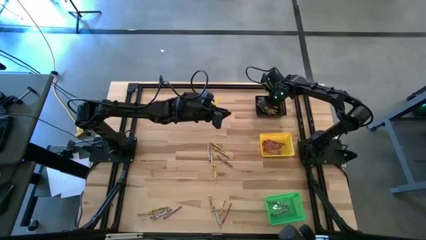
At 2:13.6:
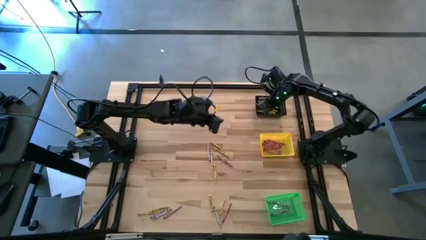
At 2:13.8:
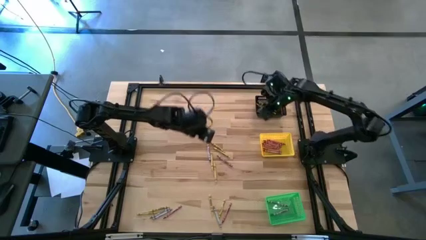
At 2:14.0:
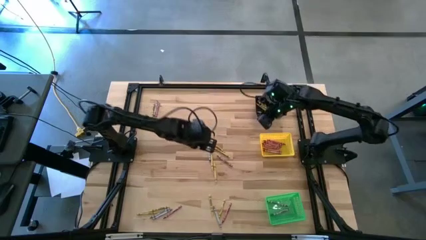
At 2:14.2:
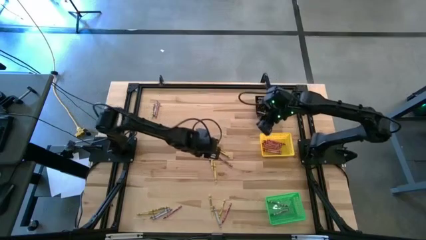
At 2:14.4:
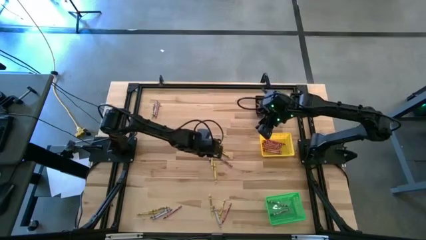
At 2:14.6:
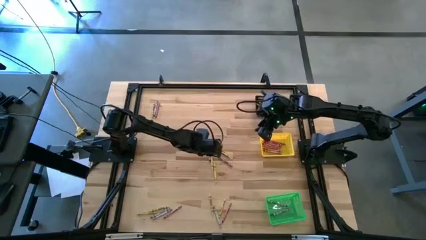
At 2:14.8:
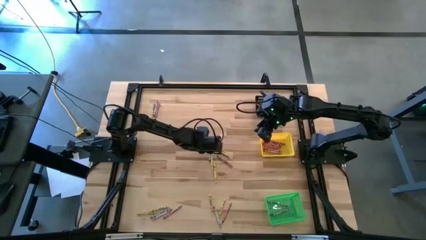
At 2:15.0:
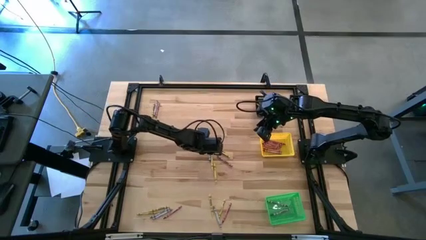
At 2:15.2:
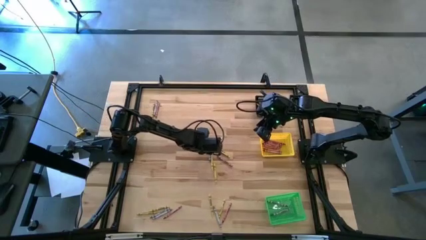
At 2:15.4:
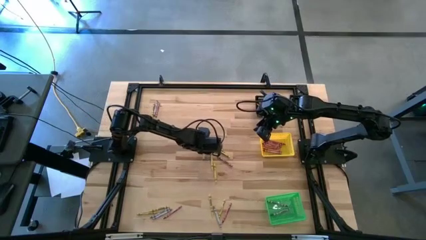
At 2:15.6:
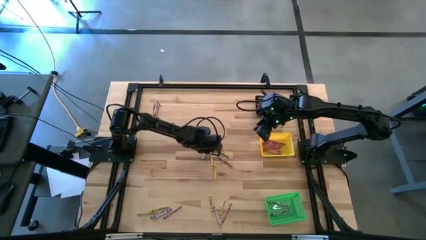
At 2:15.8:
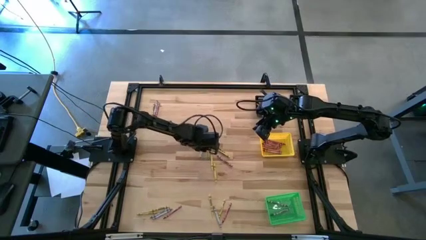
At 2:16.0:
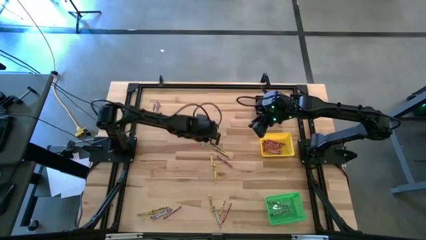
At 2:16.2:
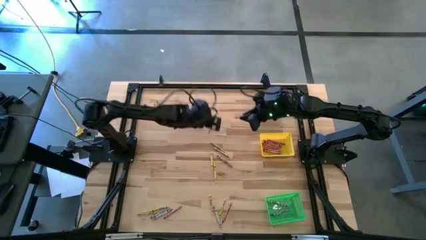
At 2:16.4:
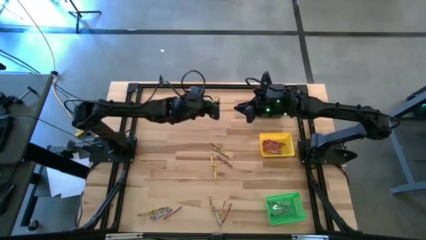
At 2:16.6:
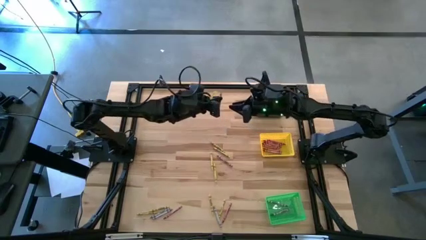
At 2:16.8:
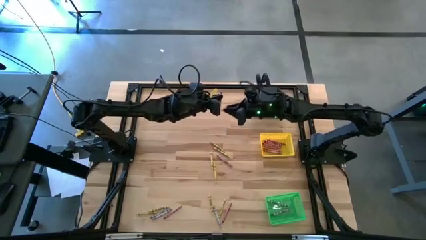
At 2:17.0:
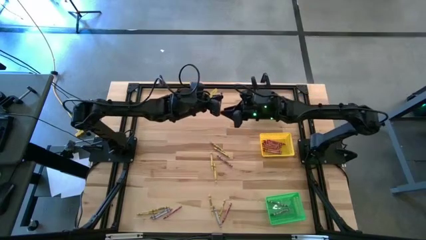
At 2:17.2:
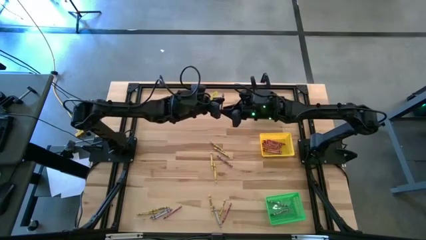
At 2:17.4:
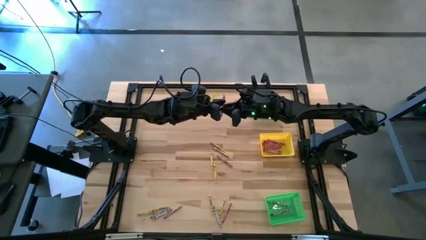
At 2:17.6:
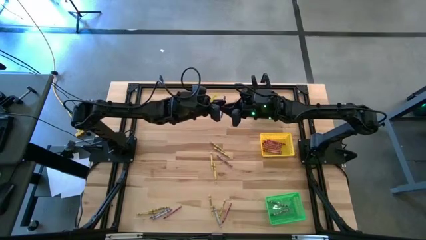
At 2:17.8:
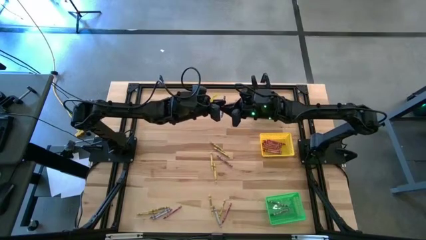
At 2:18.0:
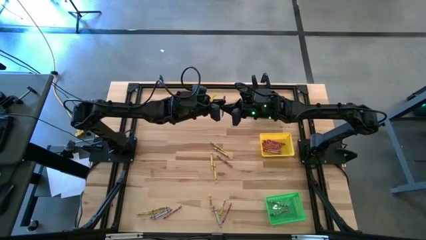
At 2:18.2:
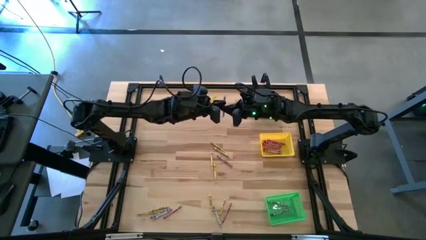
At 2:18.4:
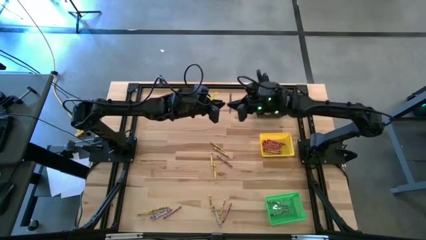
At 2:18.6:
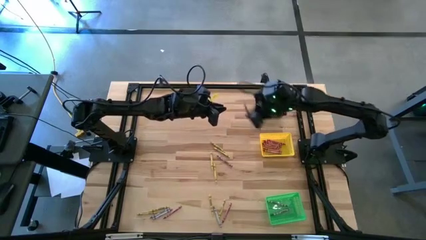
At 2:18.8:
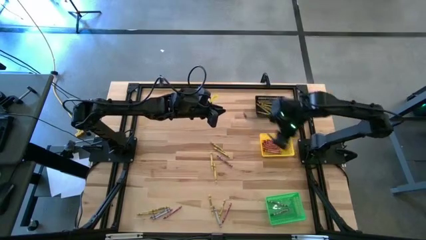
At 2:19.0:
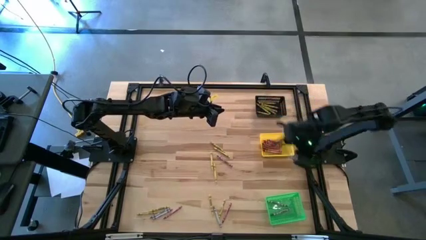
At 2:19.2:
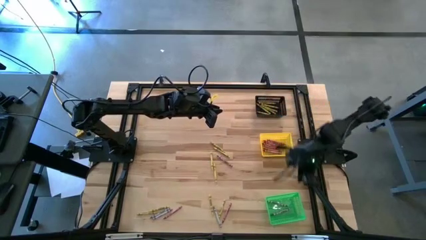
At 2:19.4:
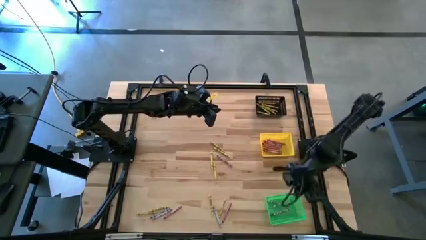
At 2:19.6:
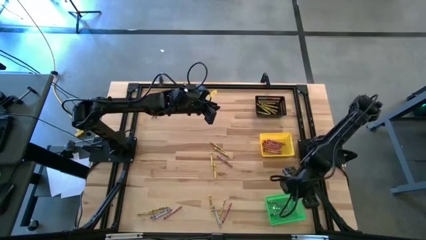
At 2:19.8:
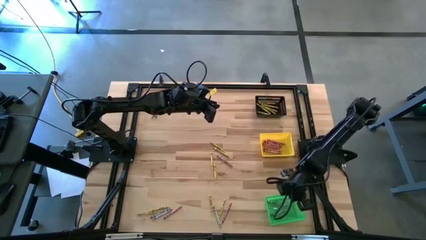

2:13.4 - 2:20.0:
Task: Sort crayons
Put the gray crayon into the green bin

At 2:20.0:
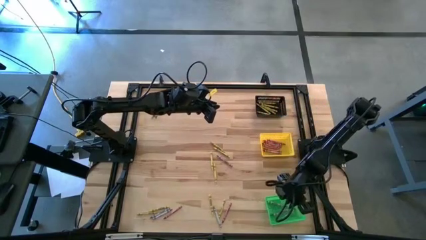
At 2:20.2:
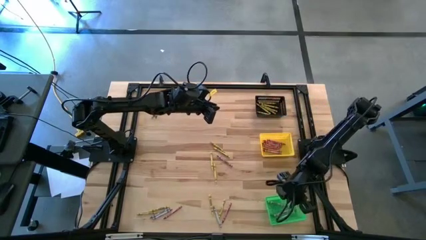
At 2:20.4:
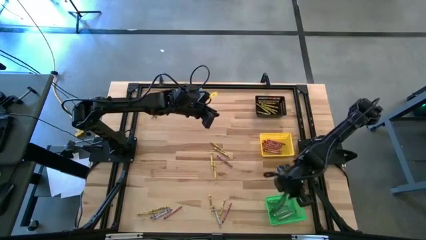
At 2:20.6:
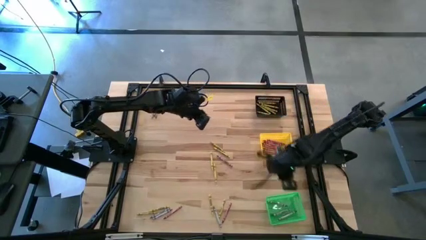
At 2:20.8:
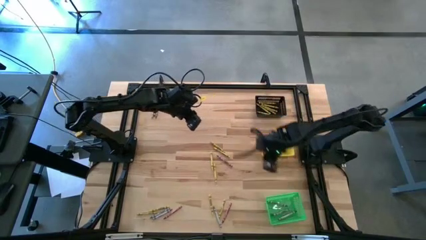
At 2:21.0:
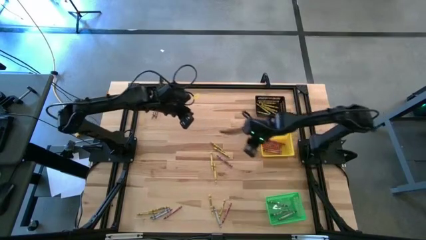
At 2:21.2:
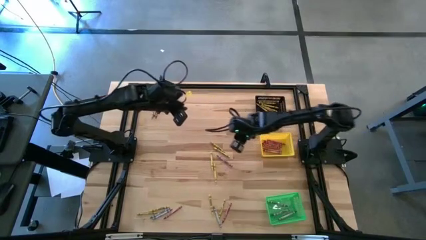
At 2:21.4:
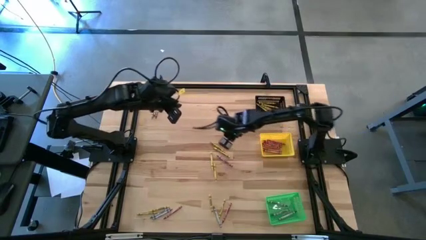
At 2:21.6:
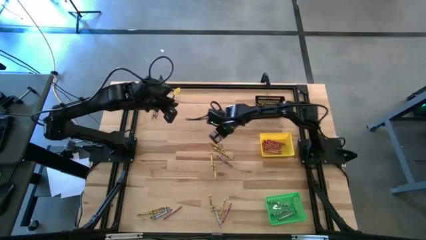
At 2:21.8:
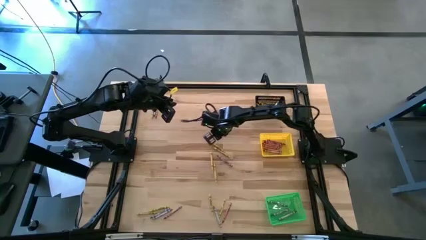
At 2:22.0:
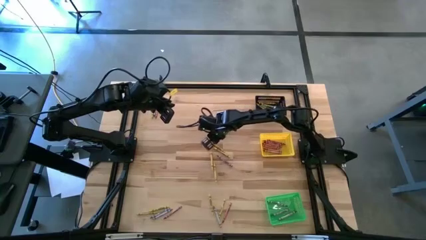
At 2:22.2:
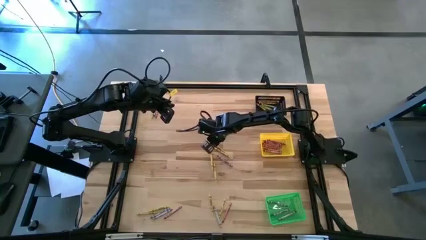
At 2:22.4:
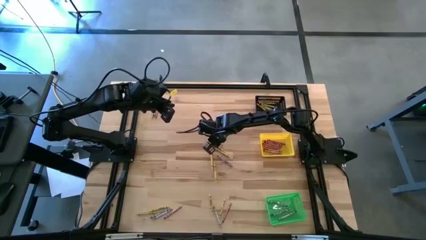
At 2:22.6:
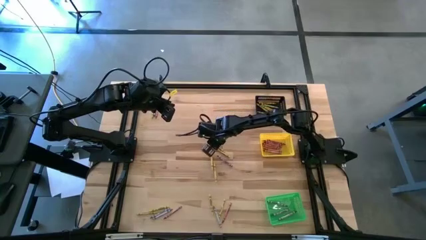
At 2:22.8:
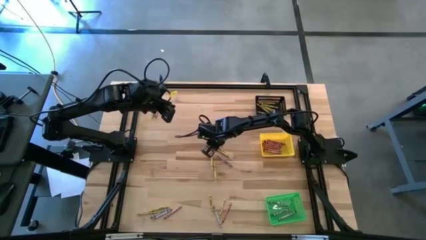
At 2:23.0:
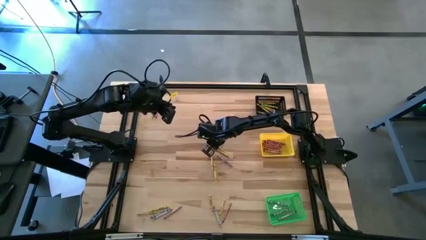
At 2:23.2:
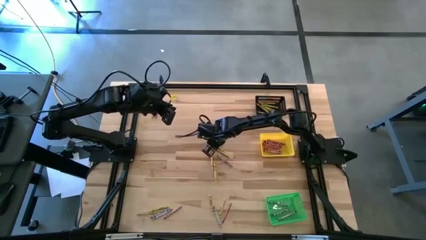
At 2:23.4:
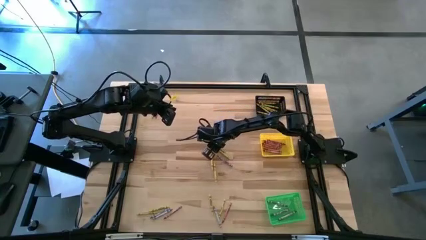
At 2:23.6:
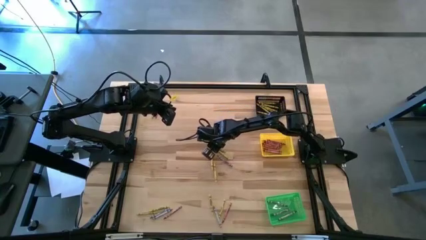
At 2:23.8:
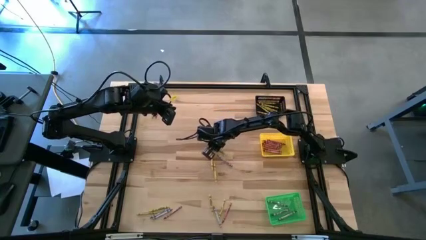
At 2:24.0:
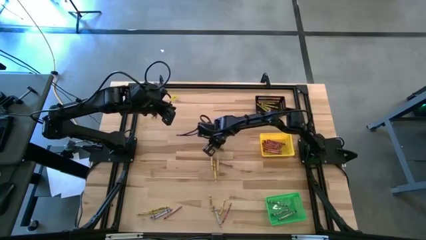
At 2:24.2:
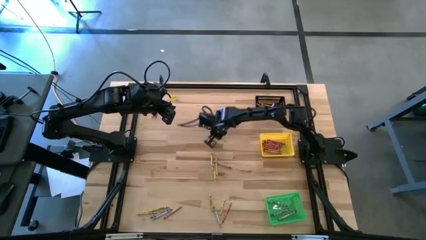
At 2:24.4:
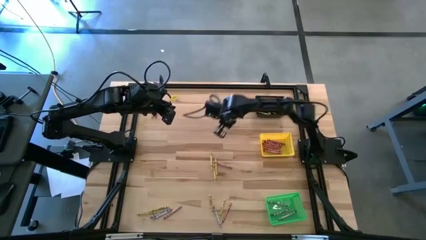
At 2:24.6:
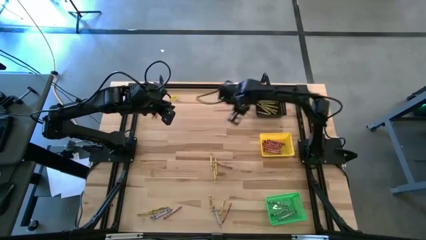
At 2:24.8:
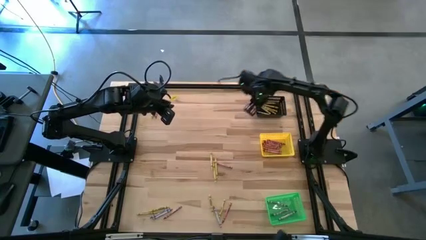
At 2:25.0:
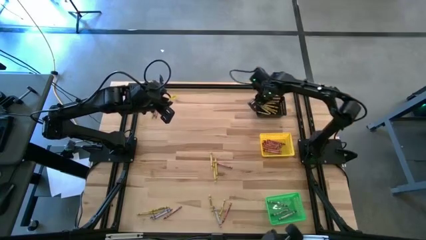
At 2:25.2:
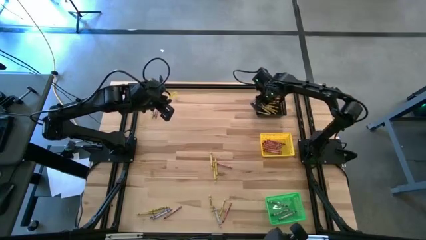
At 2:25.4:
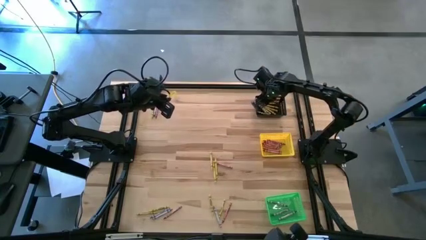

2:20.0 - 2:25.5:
Put the yellow crayon into the black bin

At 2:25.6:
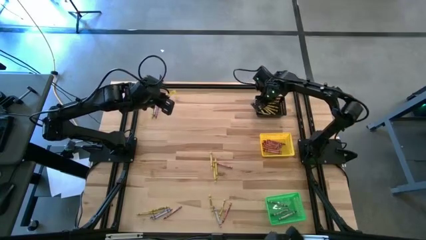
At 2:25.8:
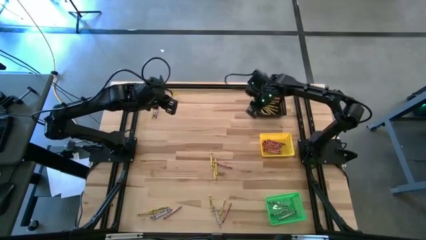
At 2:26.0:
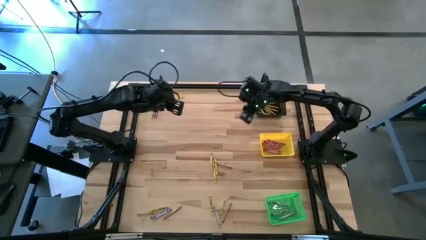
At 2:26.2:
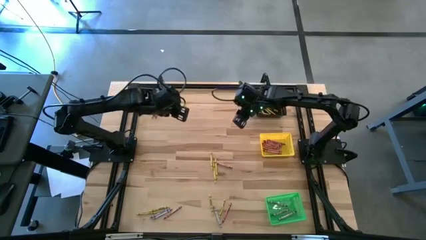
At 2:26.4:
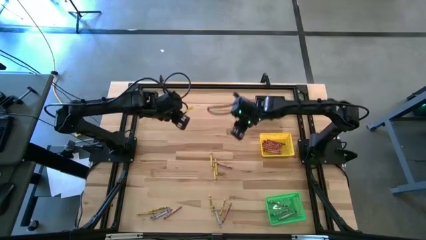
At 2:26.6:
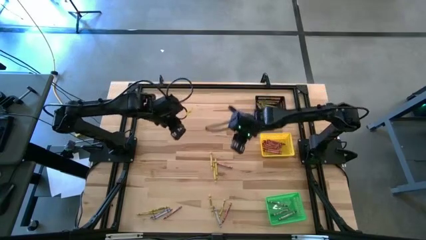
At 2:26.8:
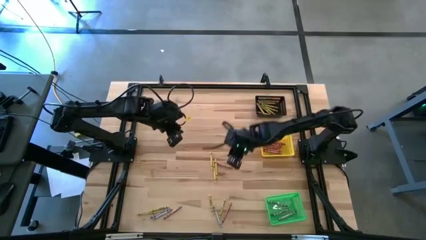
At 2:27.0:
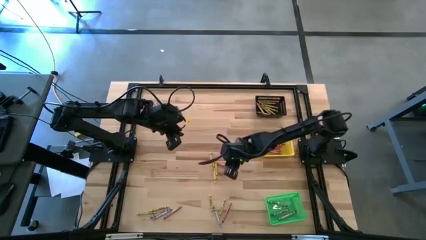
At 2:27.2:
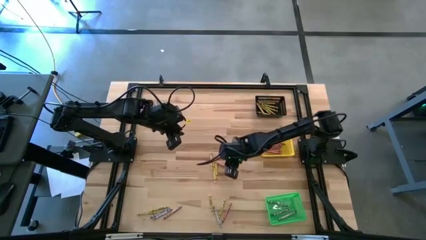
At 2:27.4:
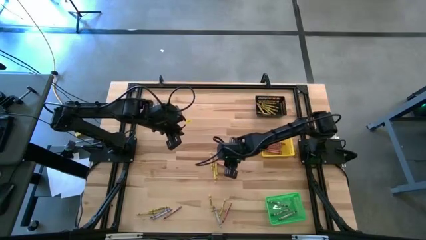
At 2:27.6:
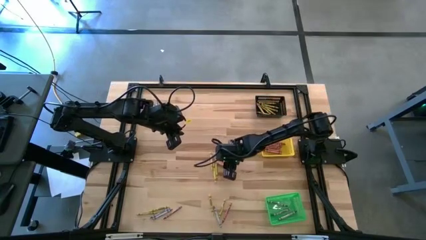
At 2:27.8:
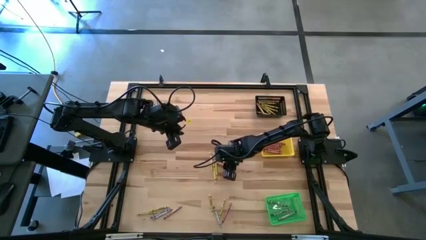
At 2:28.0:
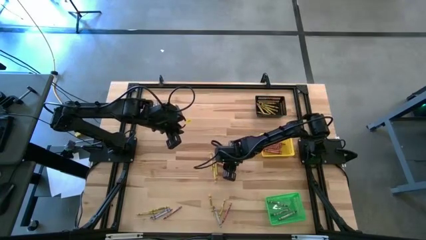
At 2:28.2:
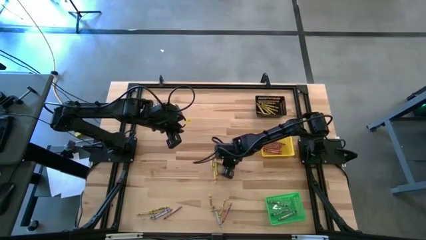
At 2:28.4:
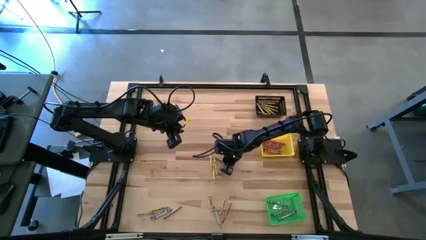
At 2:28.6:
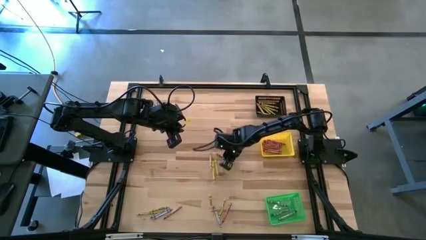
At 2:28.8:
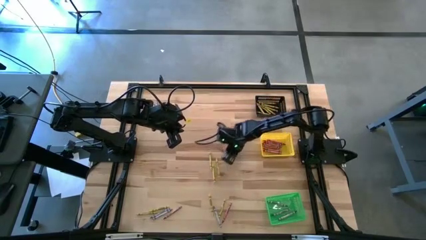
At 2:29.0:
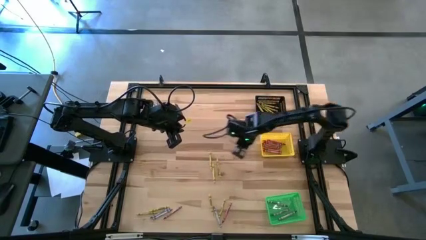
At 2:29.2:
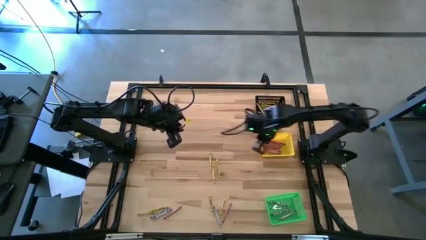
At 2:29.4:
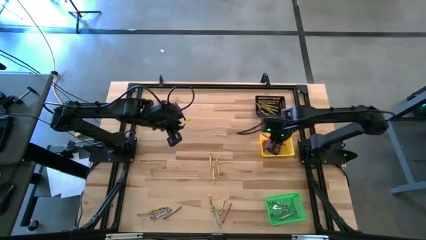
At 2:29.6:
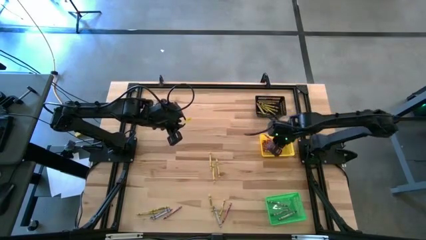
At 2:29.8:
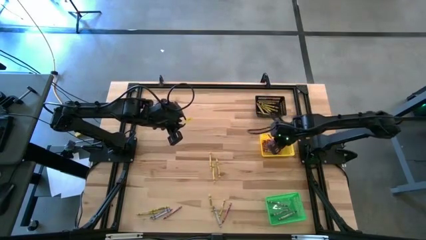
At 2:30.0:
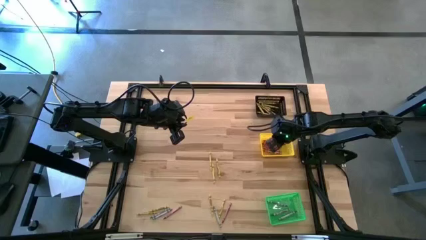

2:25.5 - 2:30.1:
Put the red crayon into the yellow bin
